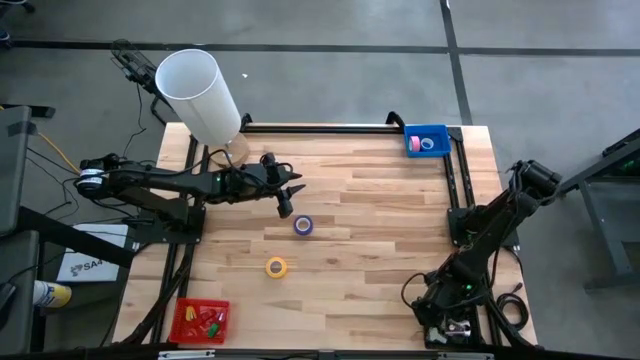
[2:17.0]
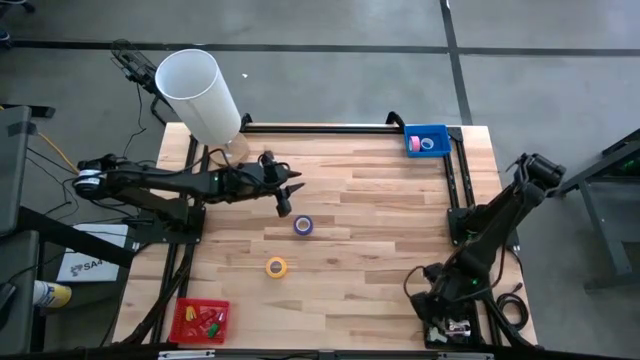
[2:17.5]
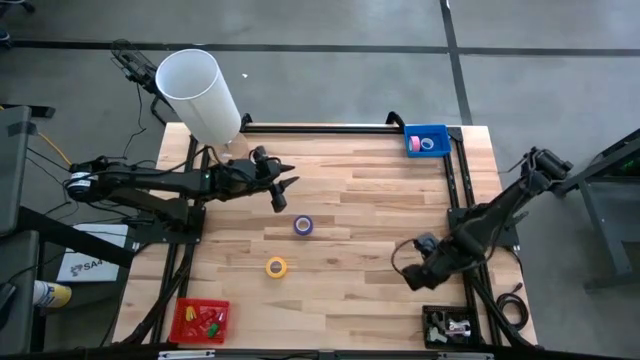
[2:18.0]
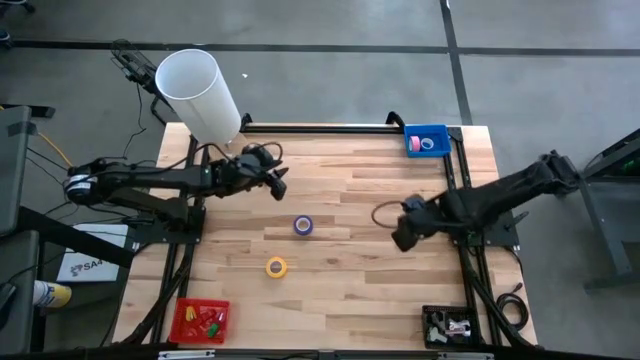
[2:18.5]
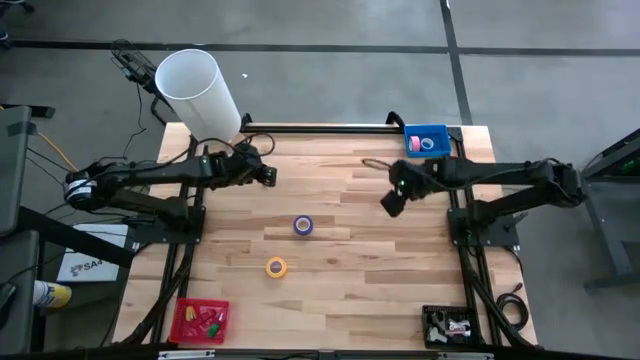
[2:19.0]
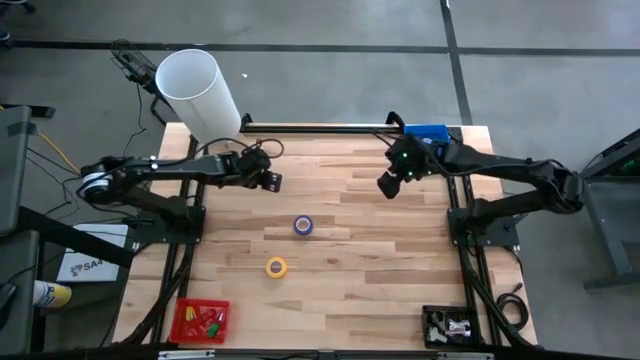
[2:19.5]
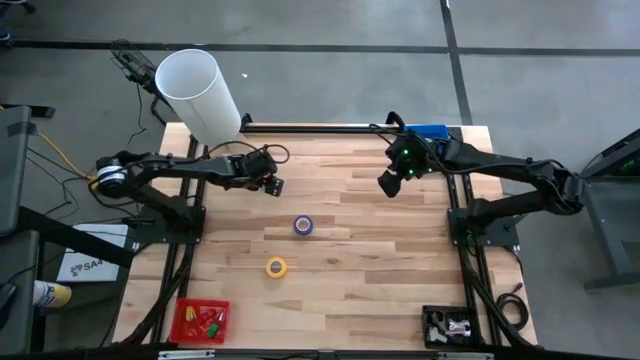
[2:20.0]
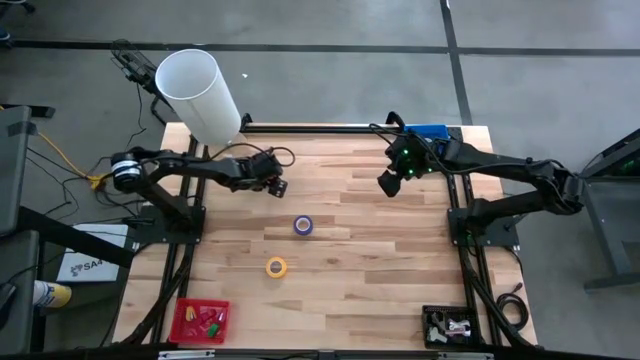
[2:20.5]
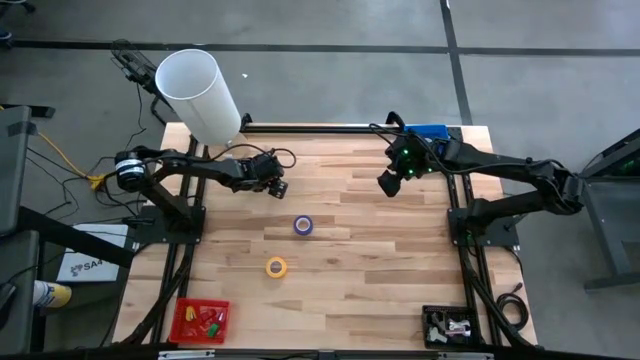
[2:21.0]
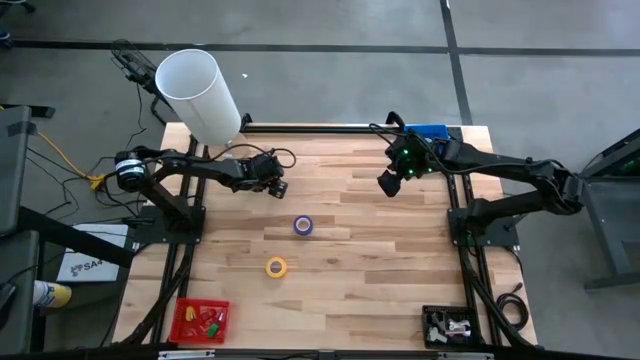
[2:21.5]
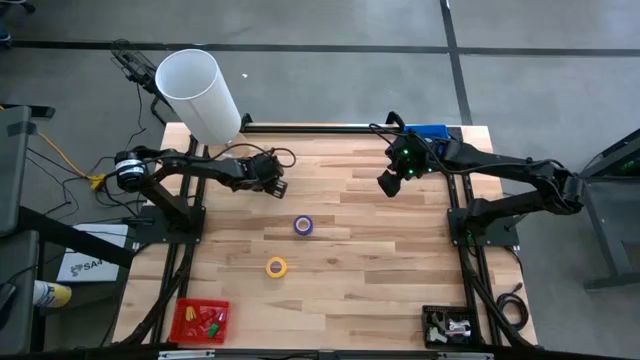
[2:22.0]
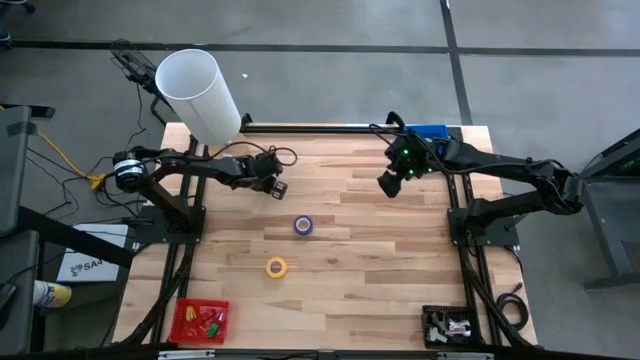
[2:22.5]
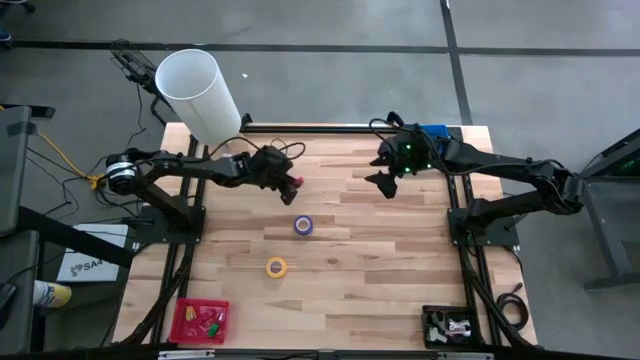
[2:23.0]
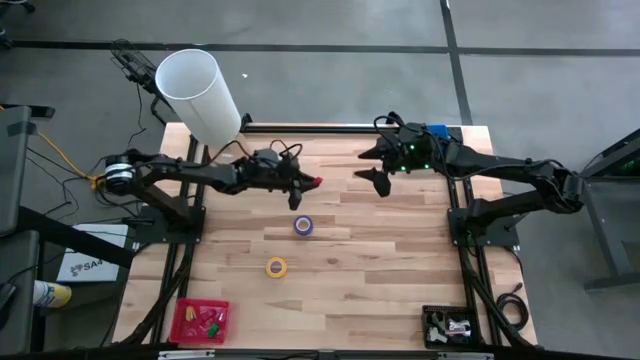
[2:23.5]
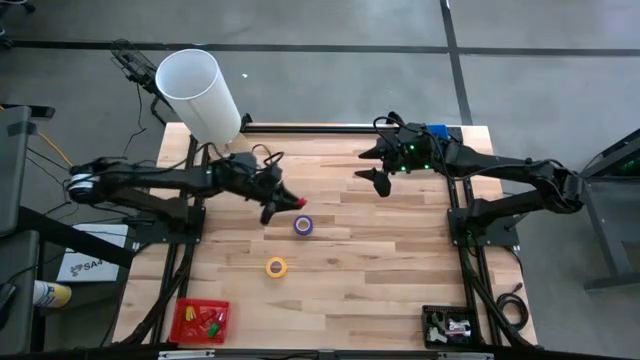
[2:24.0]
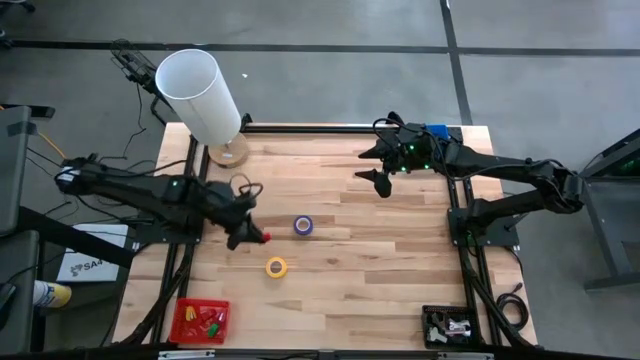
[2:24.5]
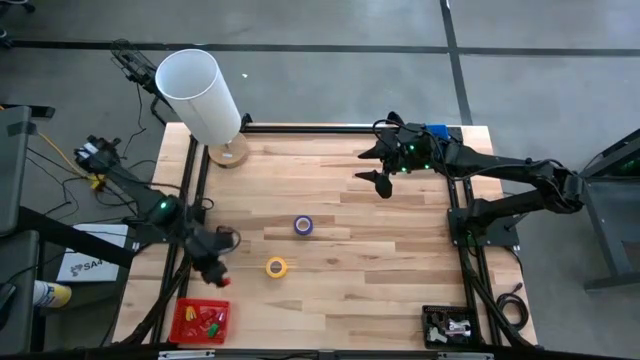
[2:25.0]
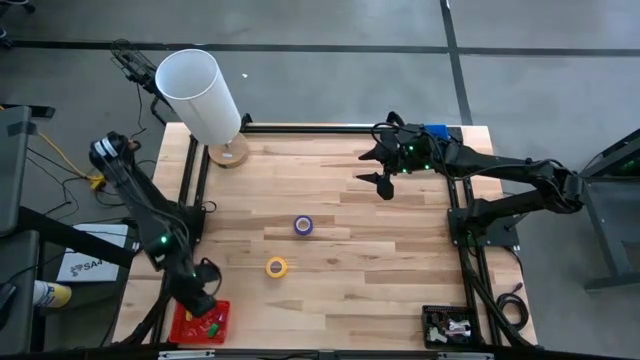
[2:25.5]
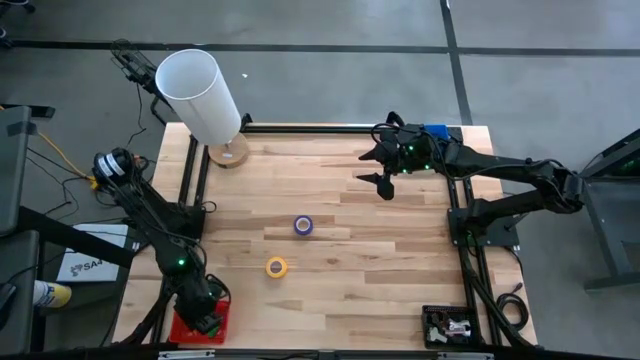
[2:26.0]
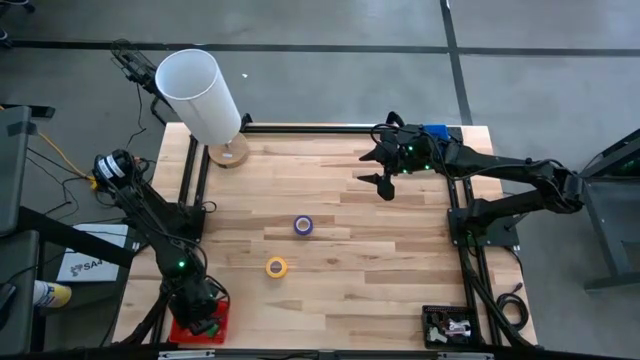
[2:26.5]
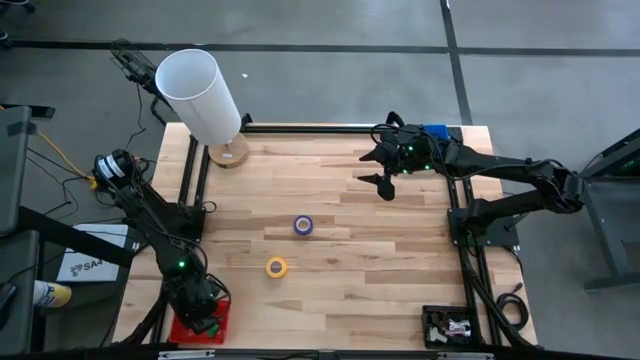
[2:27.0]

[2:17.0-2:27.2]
Task: Pick and place Stapler, Stapler remover, tape
Put the red stapler into the red bin

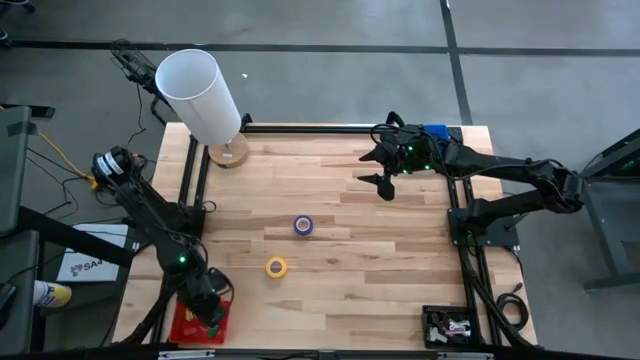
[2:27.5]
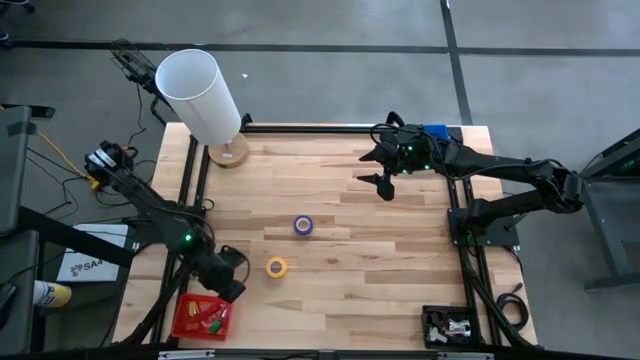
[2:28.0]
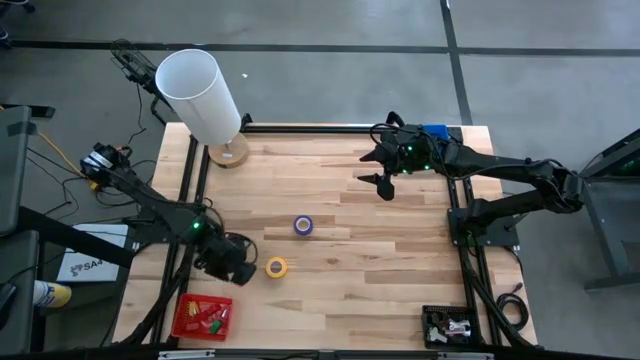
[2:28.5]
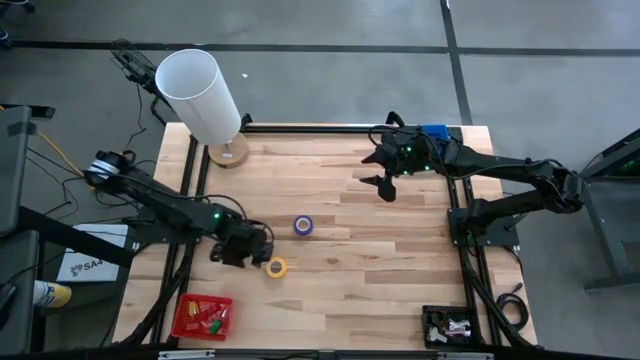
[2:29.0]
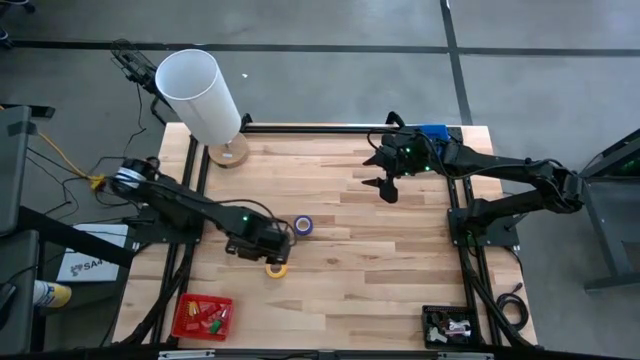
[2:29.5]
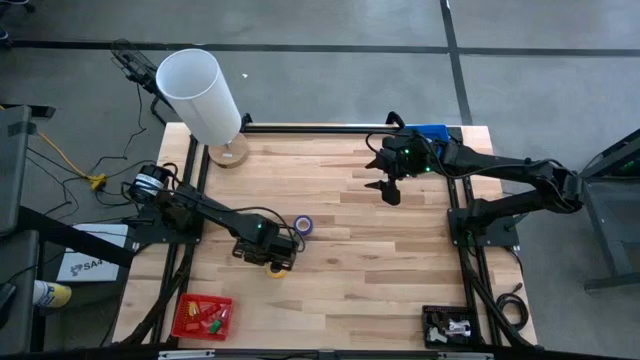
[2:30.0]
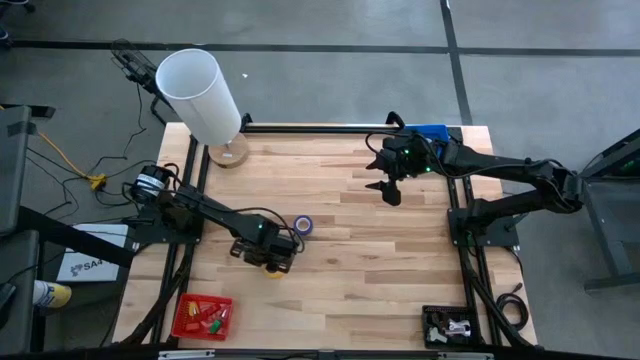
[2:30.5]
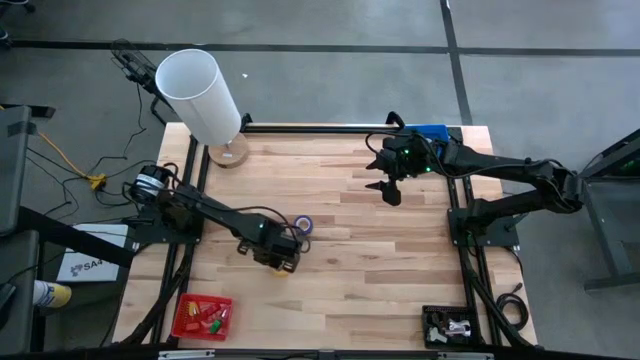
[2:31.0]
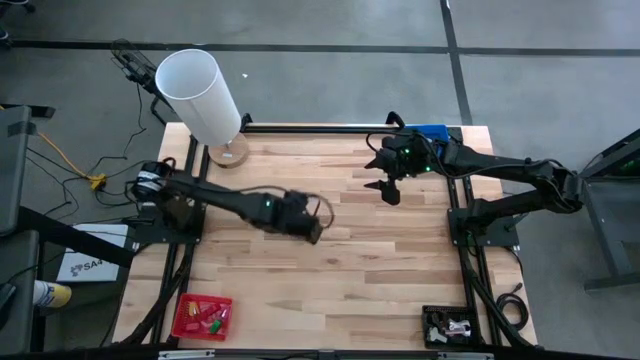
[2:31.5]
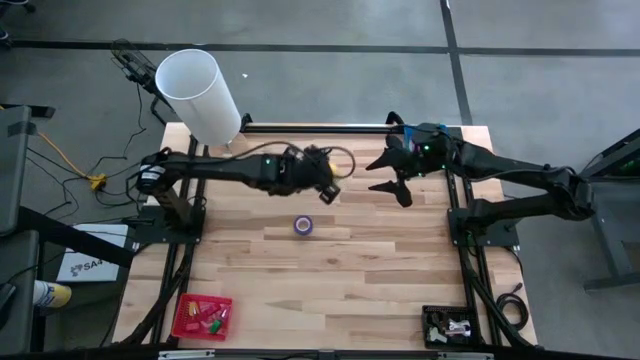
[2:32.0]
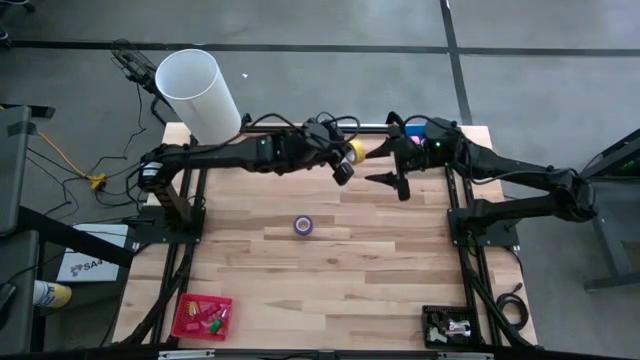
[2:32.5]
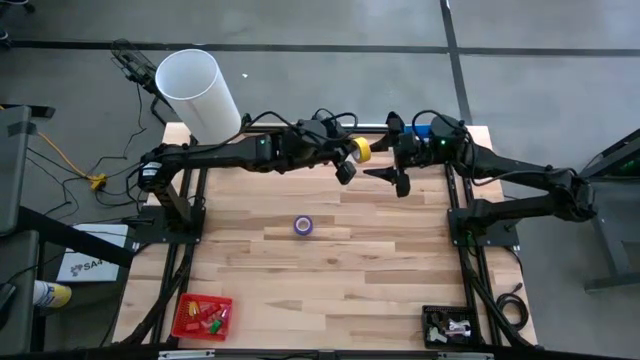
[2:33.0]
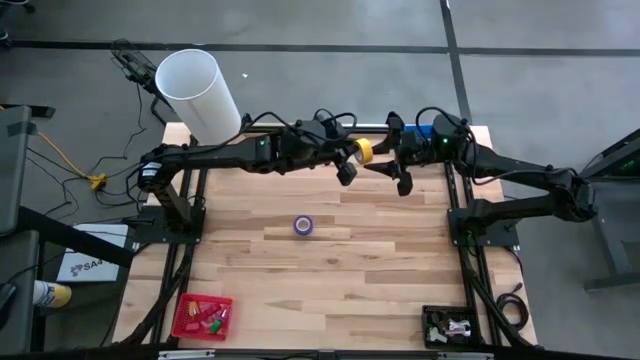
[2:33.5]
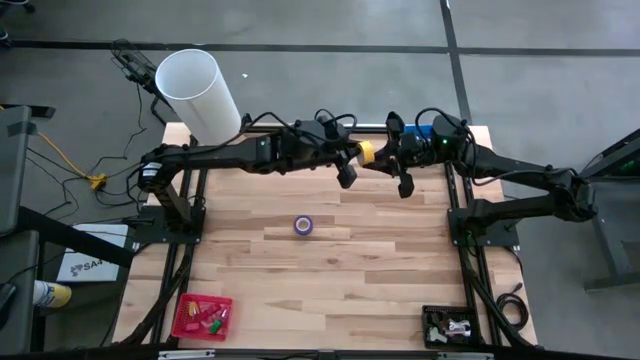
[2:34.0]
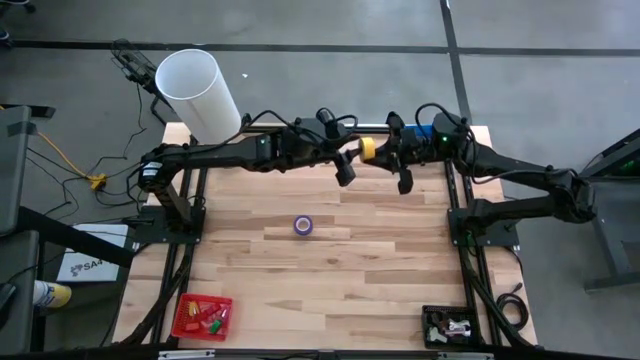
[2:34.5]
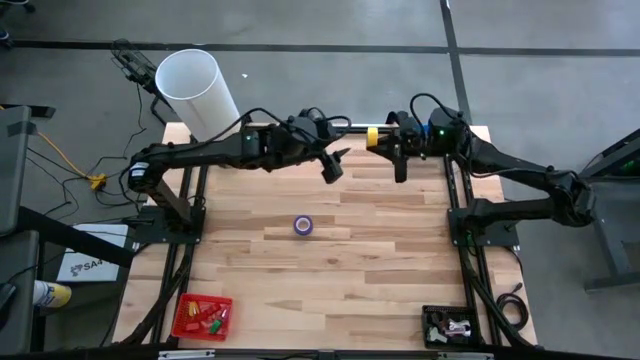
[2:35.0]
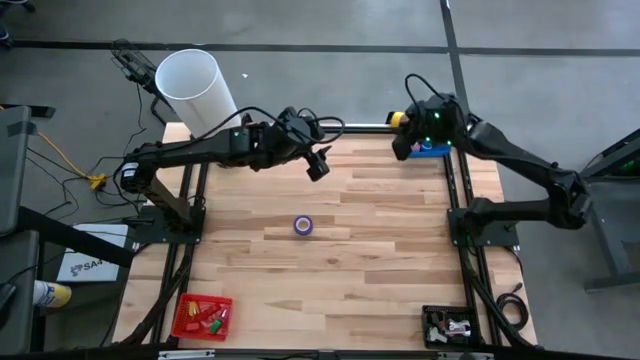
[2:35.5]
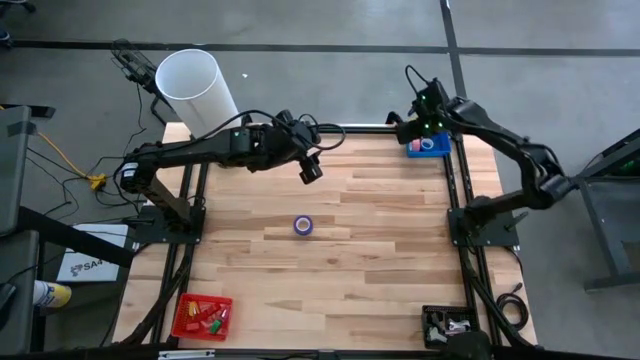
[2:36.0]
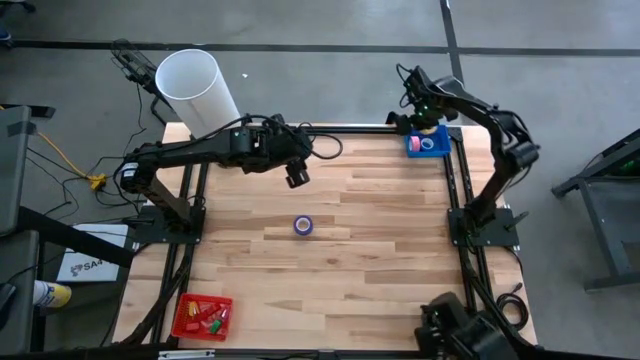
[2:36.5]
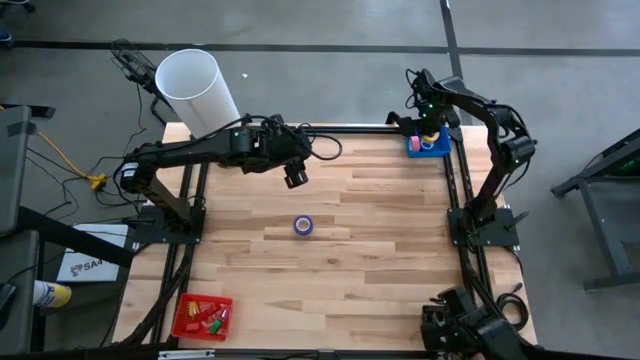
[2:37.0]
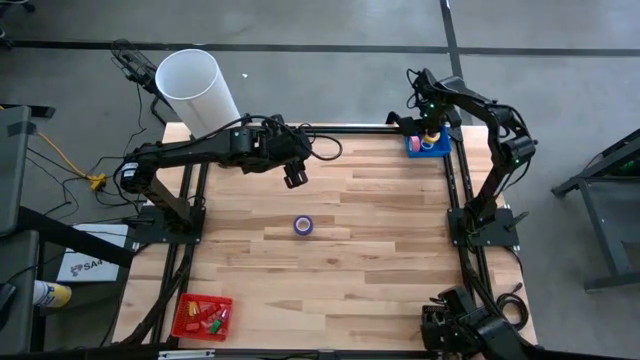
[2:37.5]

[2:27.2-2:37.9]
Put the yellow tape into the blue bin
